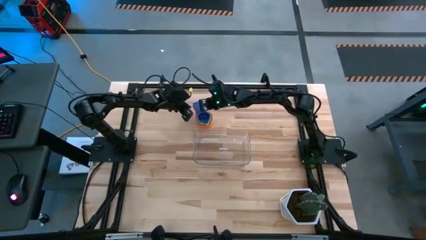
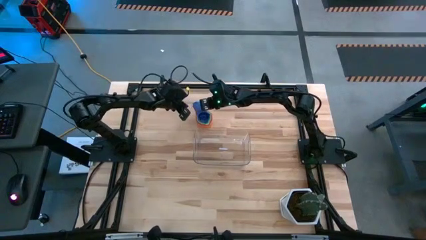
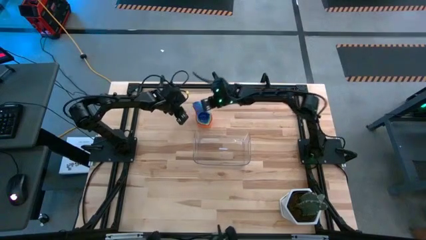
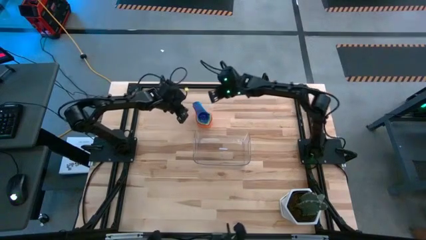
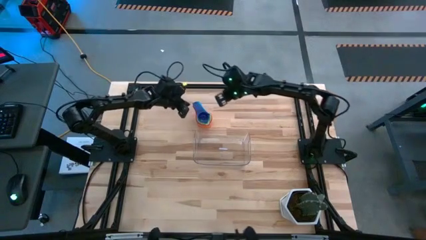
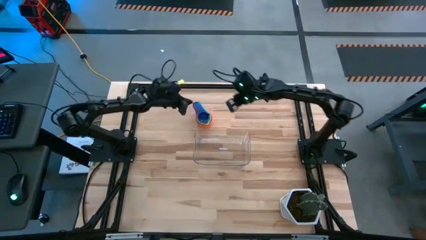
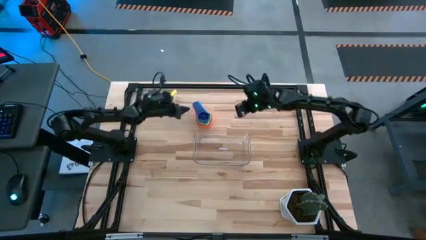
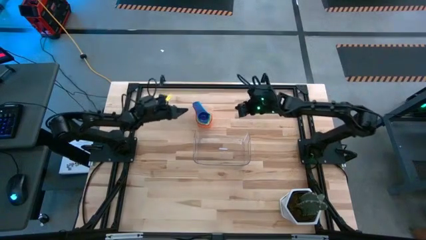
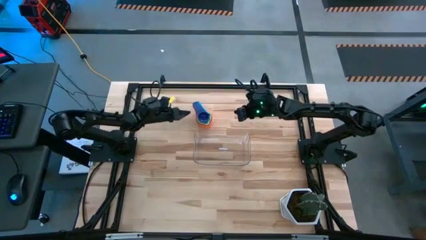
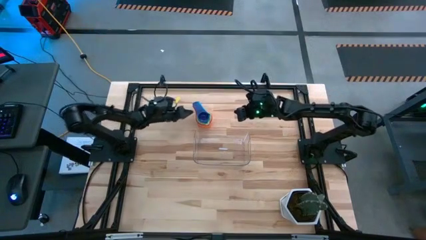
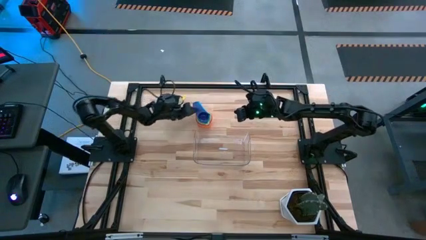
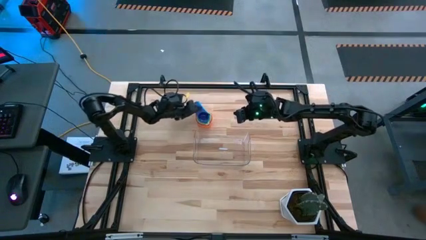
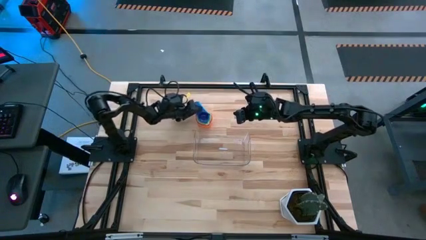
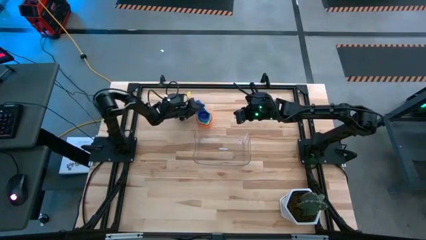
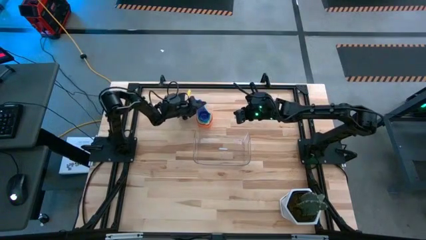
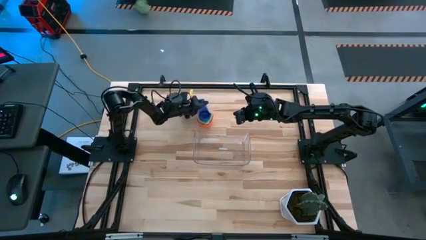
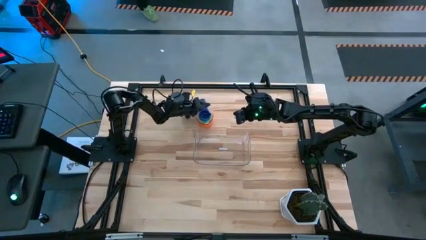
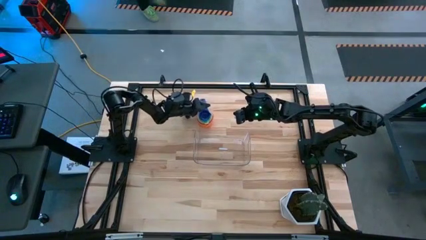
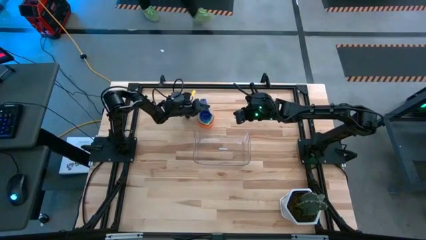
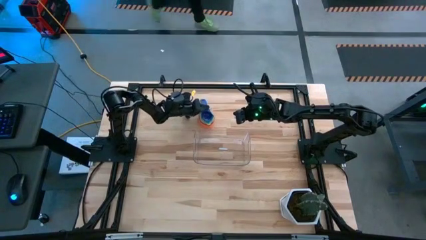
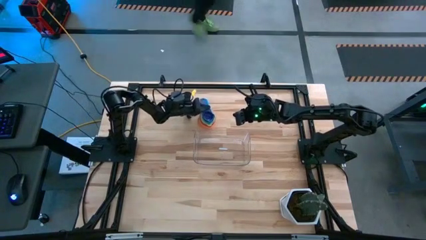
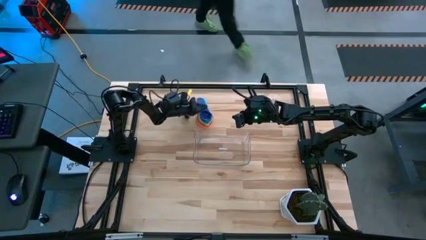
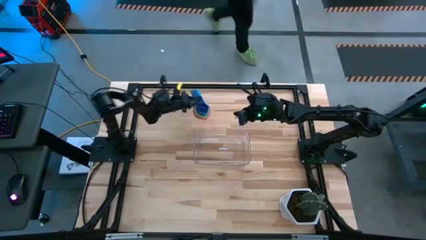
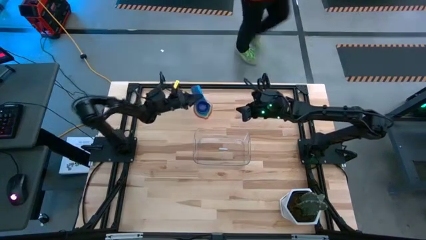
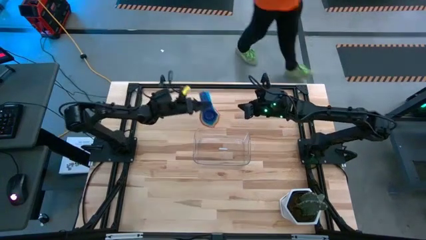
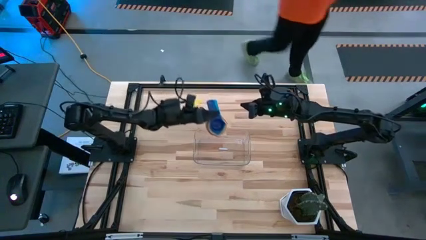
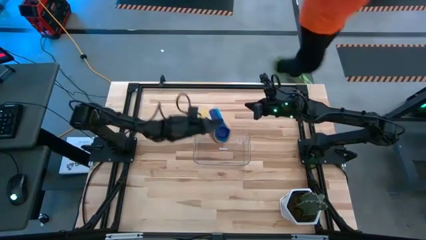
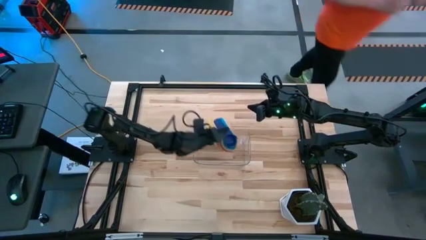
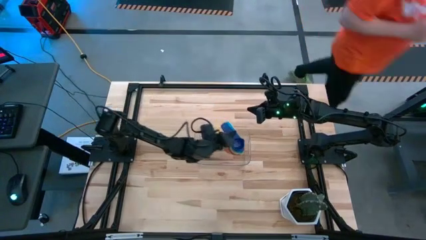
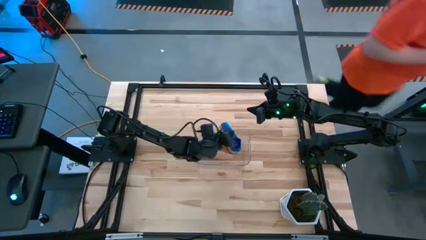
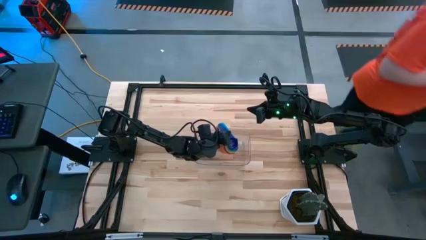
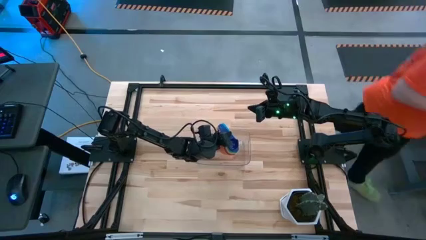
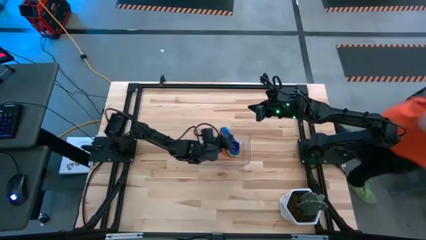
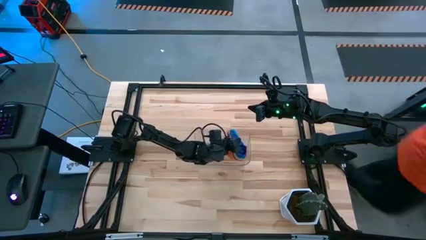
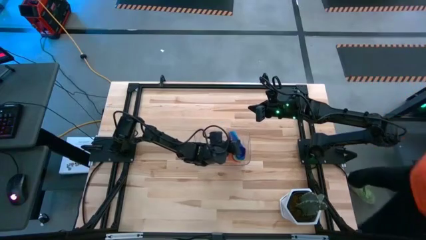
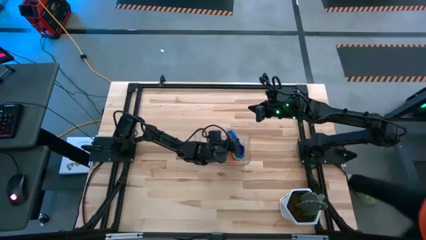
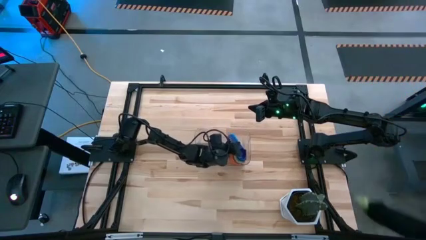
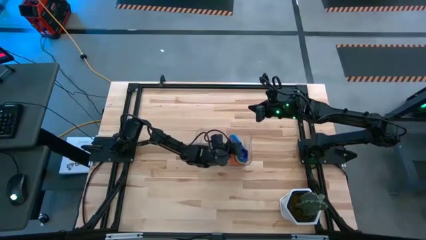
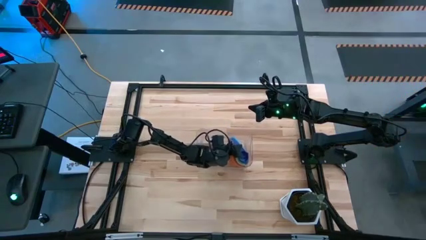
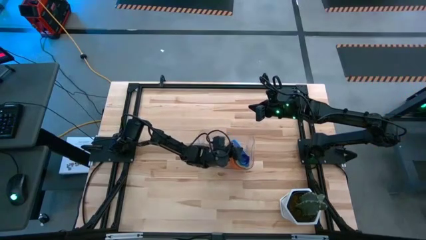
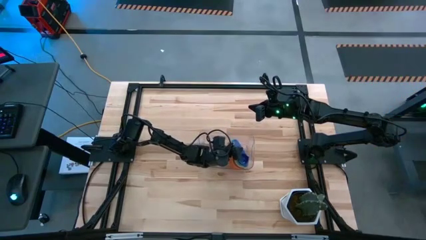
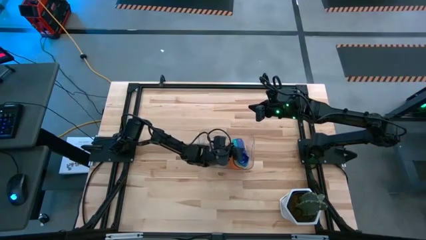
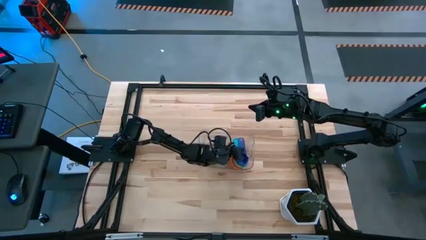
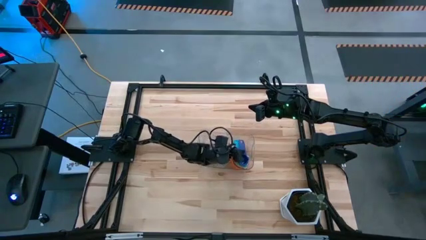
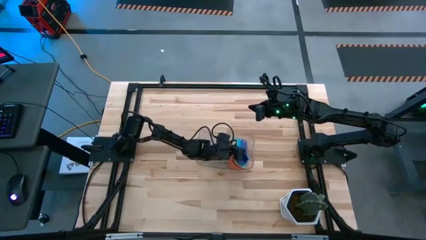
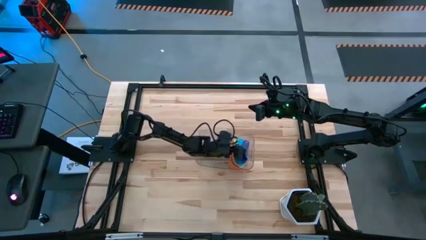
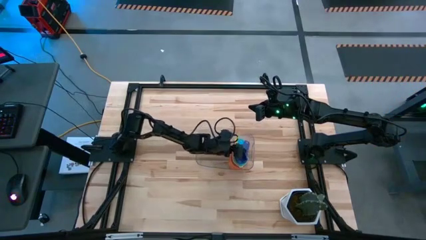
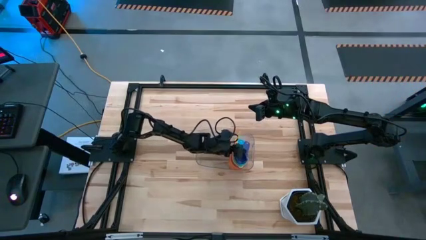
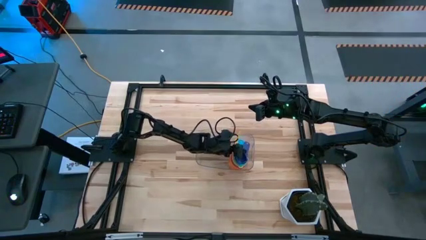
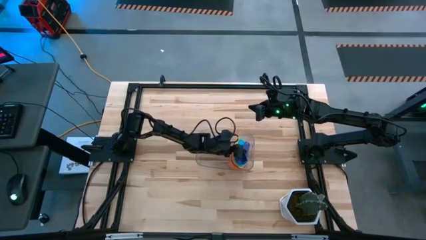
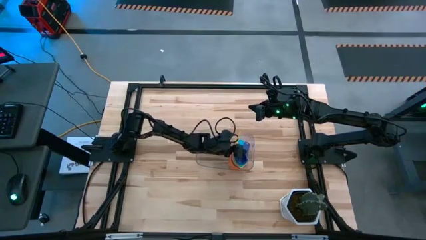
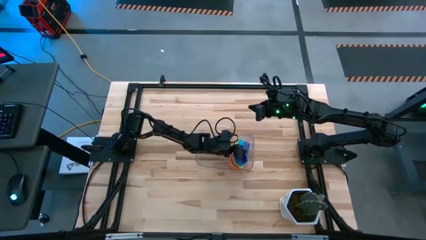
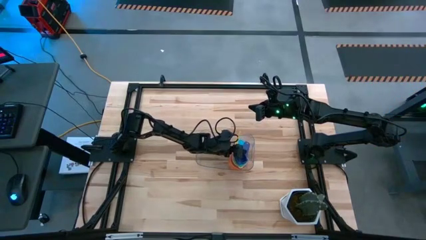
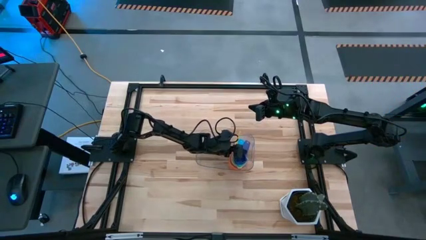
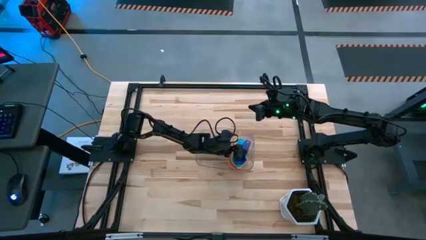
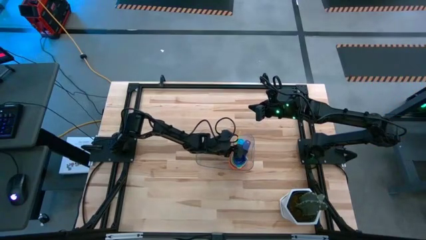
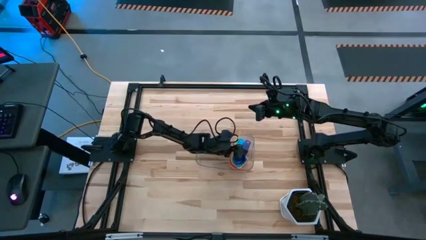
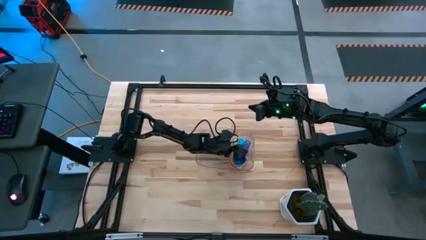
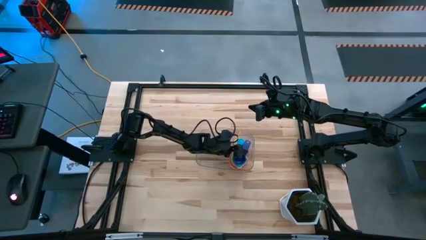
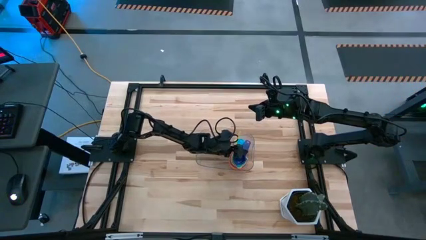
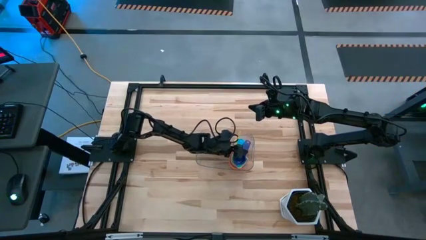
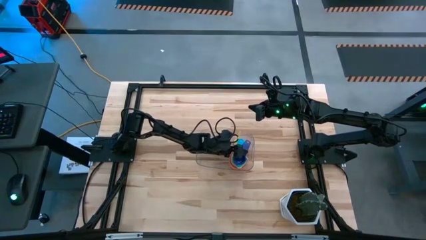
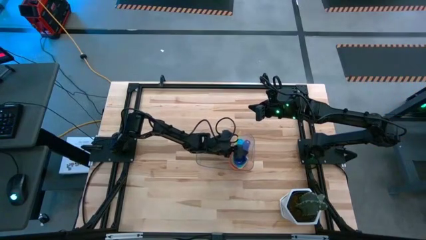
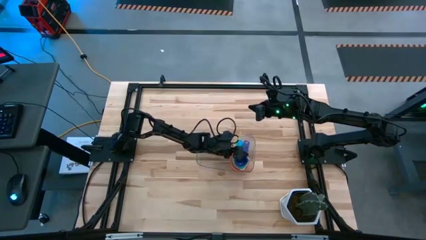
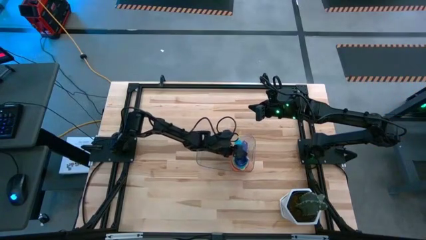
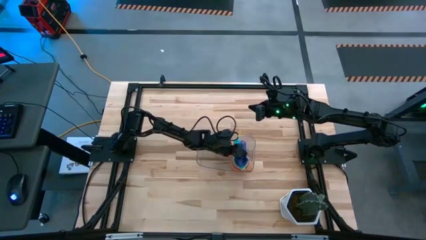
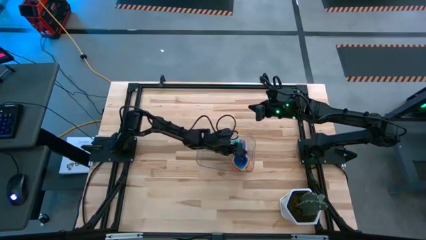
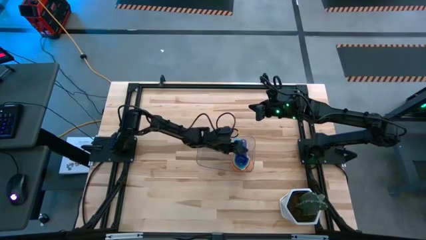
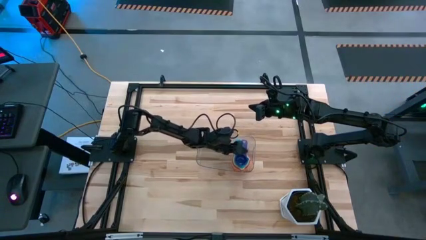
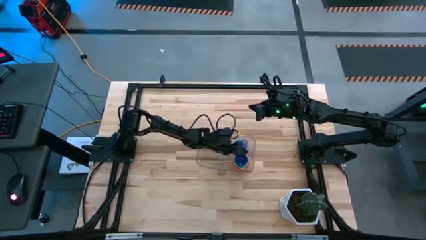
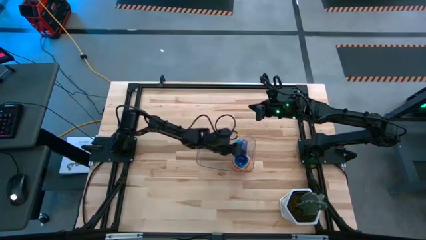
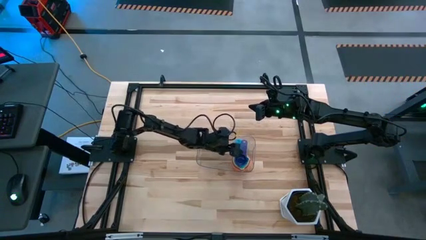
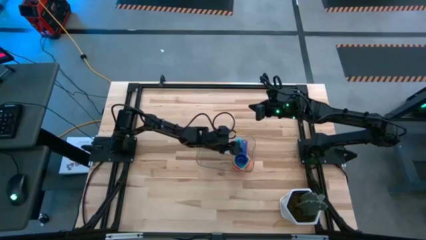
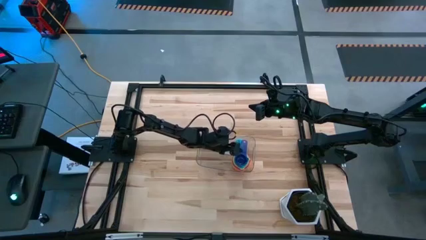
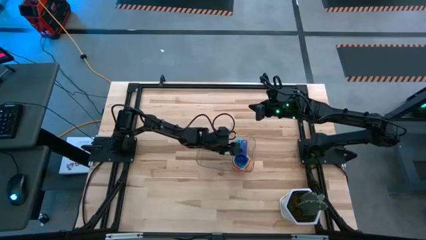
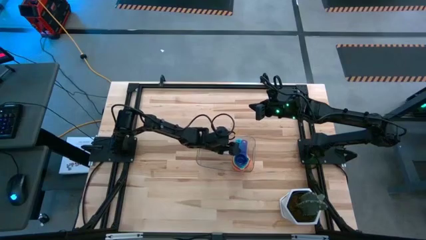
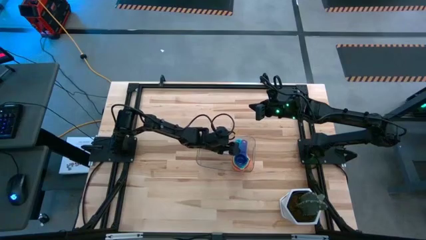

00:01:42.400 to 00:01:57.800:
Task: Nest measuring cups in basket
Put the stacked measuring cups into the transparent bin

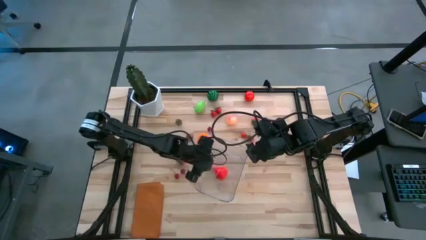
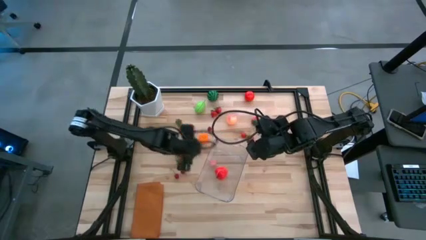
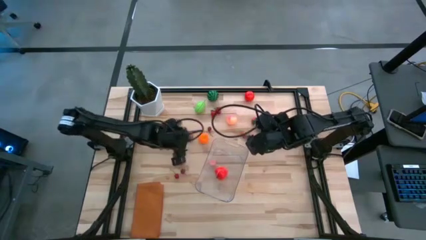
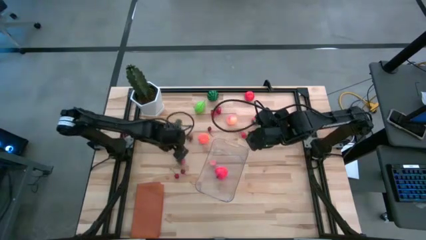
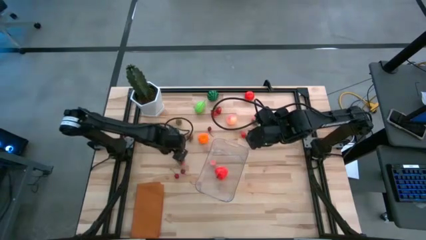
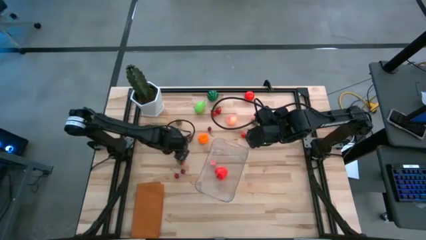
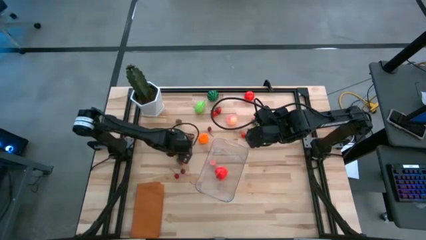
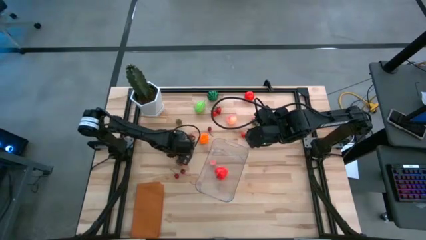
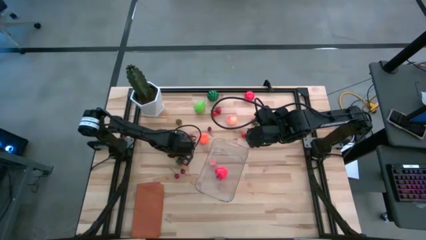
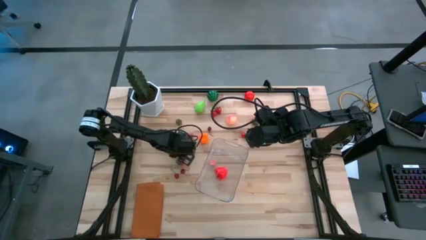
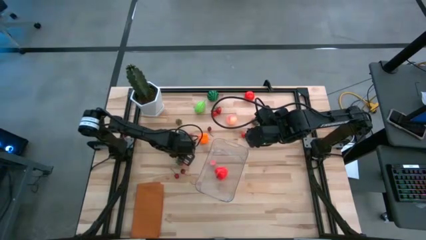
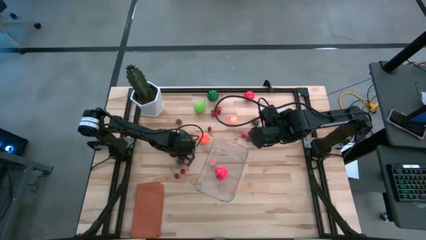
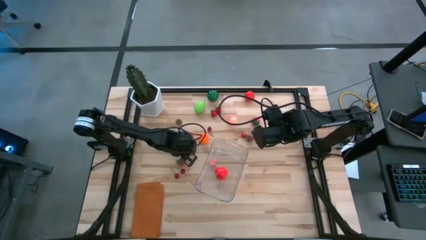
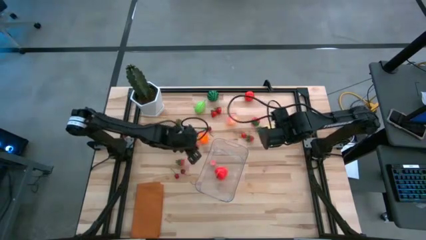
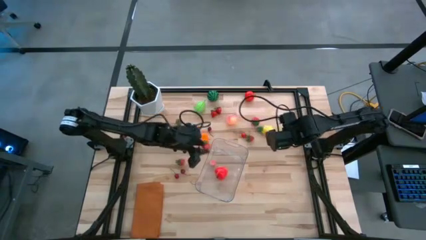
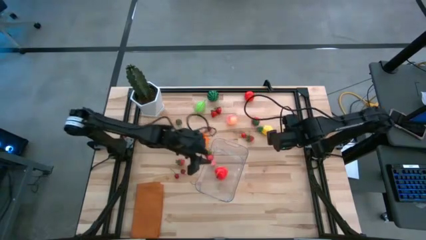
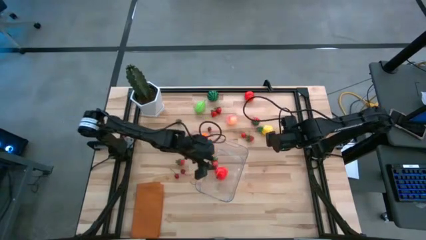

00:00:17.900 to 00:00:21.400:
Task: Pick and placing Produce into tupperware
Put the red strawberry into the transparent bin
